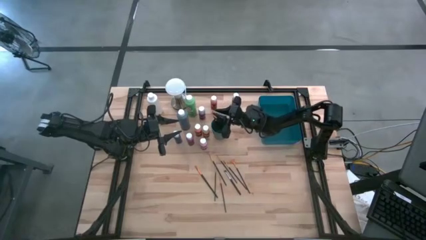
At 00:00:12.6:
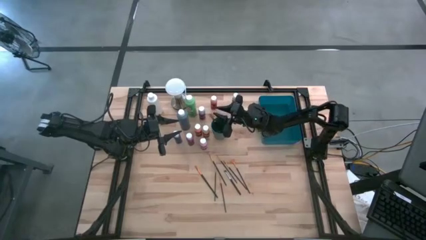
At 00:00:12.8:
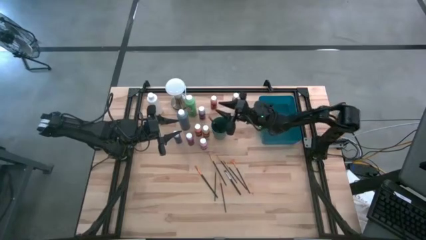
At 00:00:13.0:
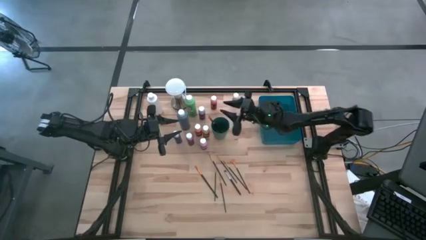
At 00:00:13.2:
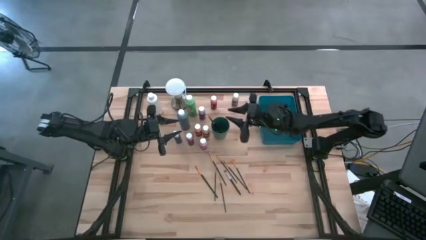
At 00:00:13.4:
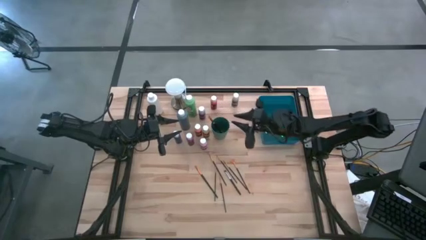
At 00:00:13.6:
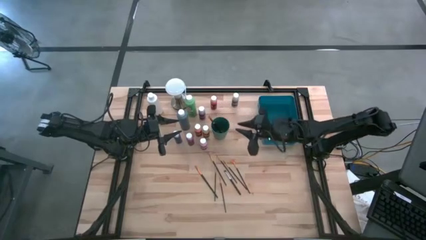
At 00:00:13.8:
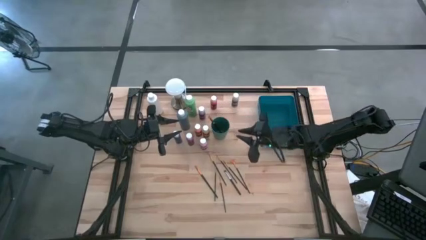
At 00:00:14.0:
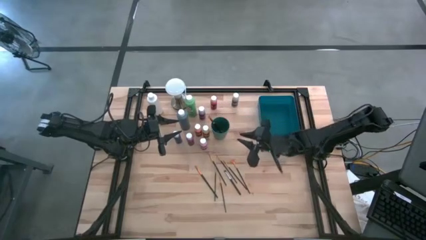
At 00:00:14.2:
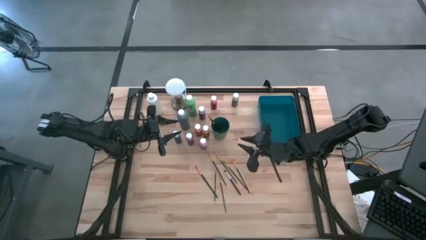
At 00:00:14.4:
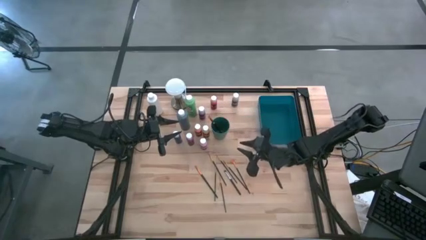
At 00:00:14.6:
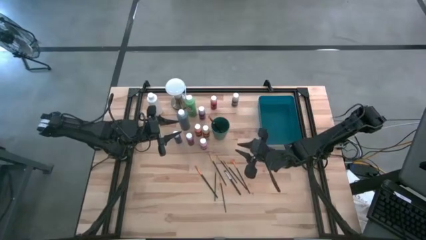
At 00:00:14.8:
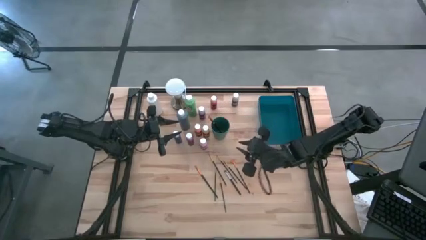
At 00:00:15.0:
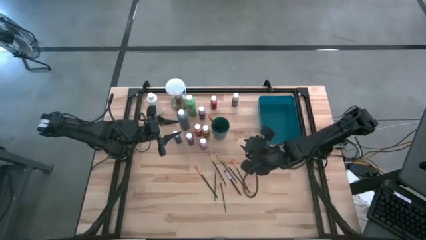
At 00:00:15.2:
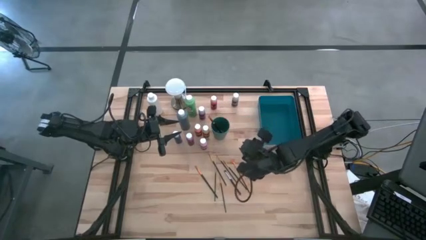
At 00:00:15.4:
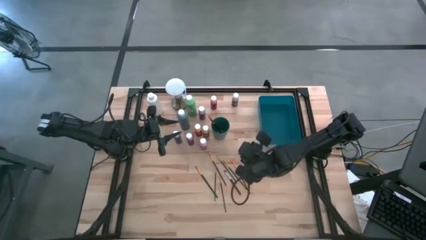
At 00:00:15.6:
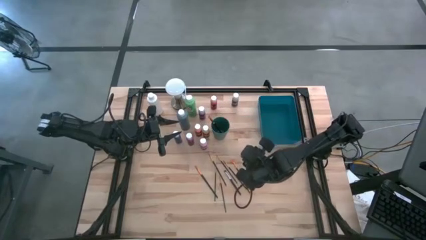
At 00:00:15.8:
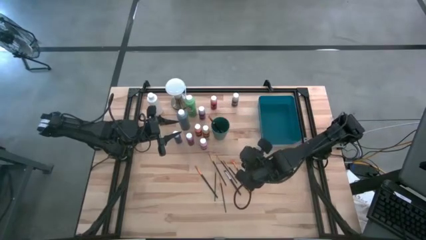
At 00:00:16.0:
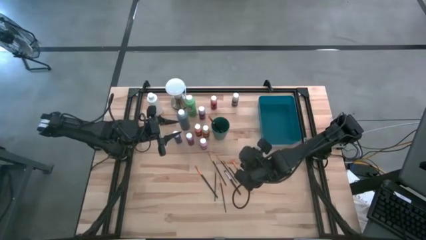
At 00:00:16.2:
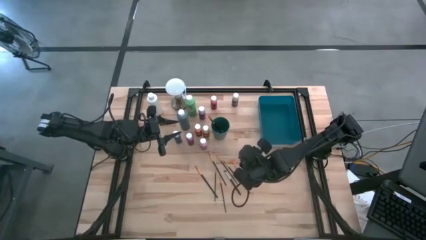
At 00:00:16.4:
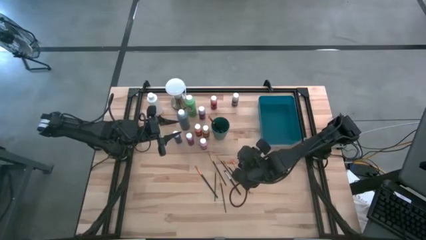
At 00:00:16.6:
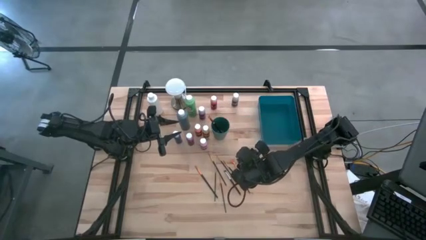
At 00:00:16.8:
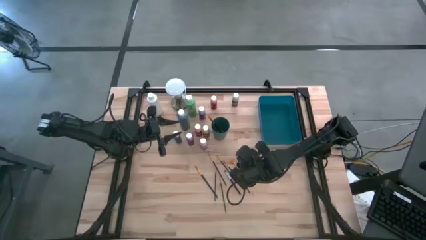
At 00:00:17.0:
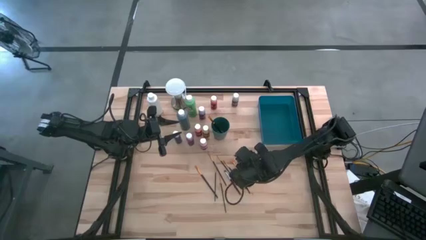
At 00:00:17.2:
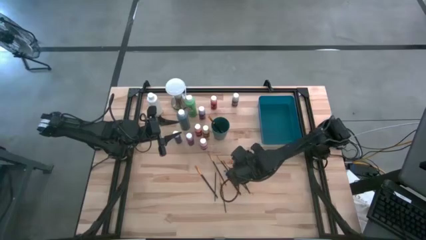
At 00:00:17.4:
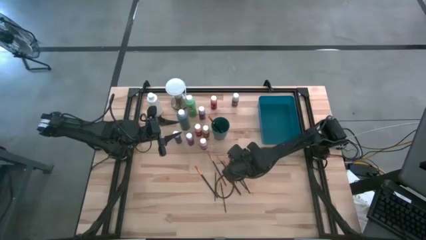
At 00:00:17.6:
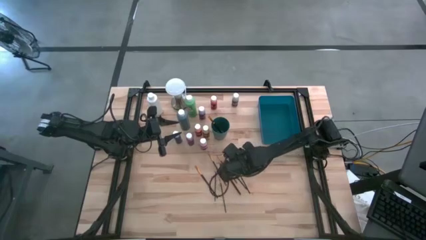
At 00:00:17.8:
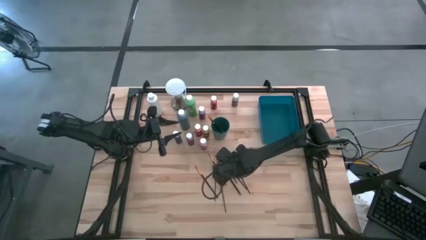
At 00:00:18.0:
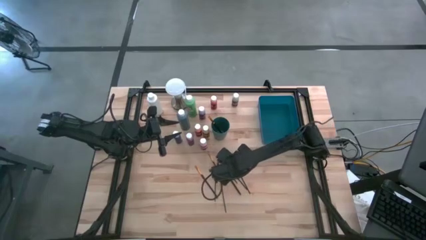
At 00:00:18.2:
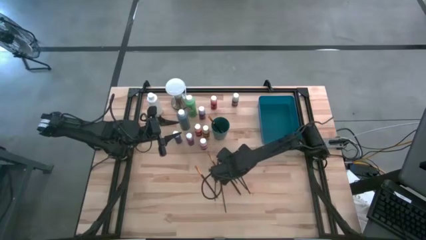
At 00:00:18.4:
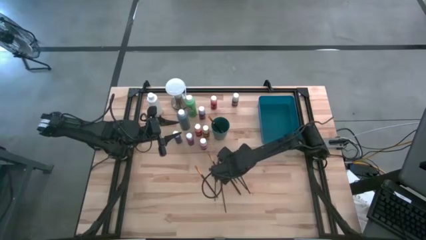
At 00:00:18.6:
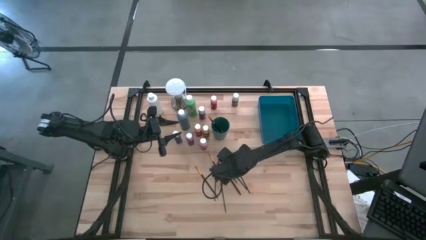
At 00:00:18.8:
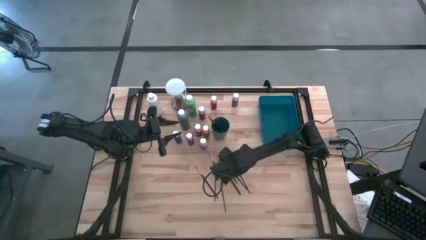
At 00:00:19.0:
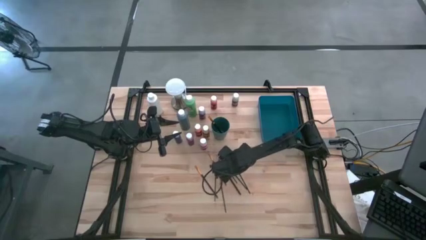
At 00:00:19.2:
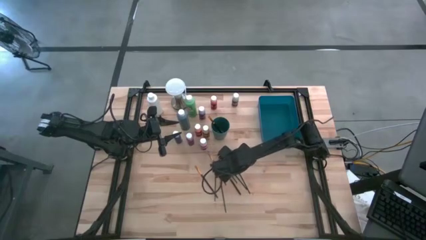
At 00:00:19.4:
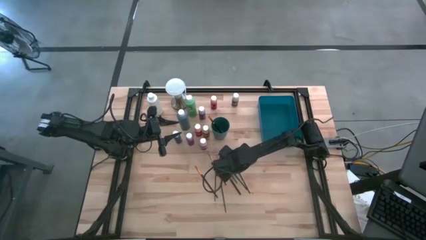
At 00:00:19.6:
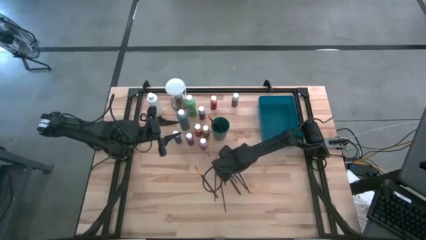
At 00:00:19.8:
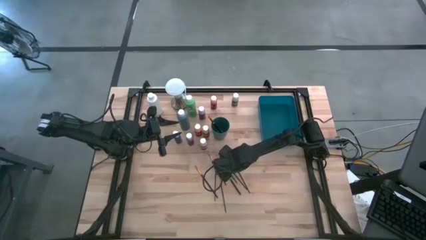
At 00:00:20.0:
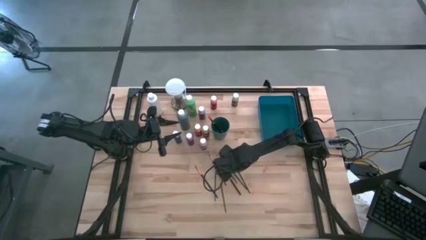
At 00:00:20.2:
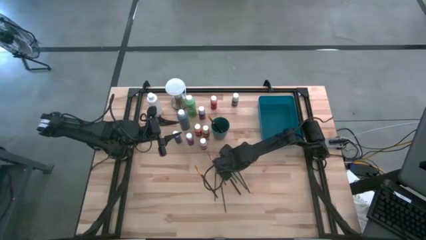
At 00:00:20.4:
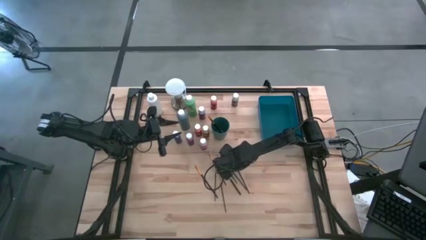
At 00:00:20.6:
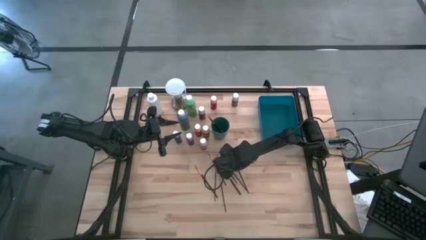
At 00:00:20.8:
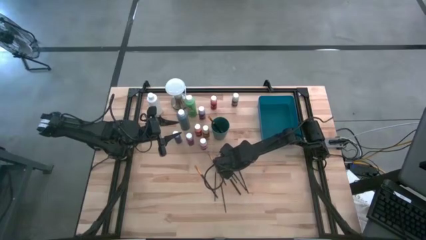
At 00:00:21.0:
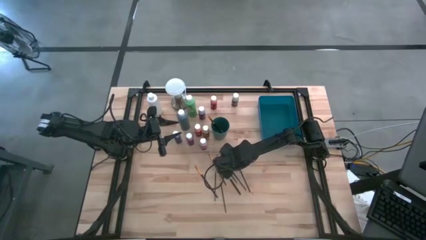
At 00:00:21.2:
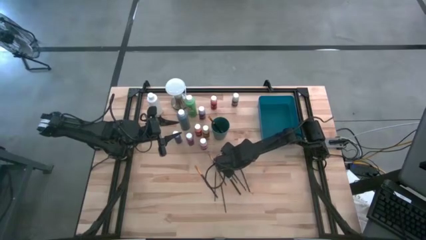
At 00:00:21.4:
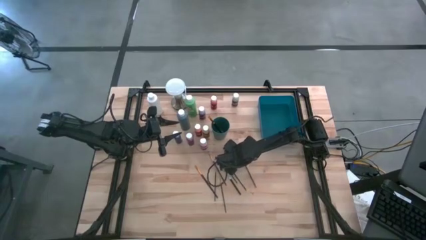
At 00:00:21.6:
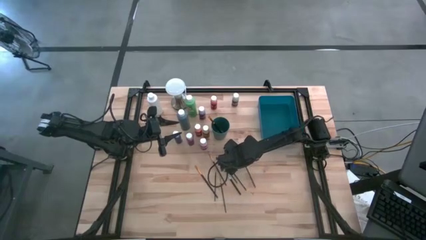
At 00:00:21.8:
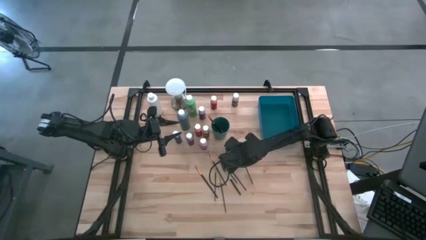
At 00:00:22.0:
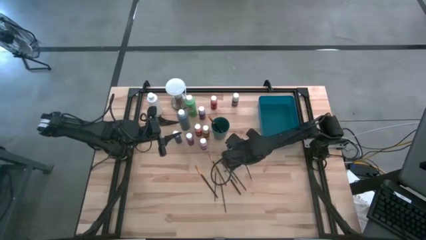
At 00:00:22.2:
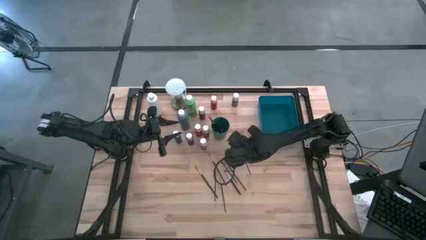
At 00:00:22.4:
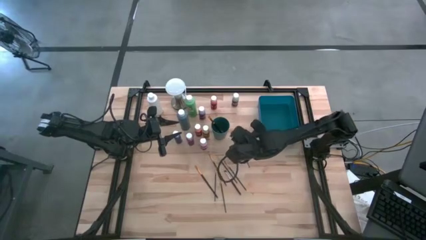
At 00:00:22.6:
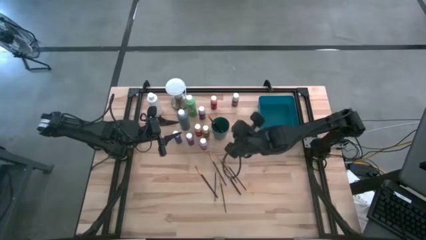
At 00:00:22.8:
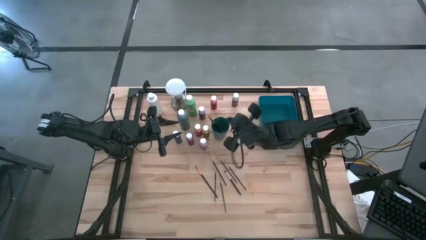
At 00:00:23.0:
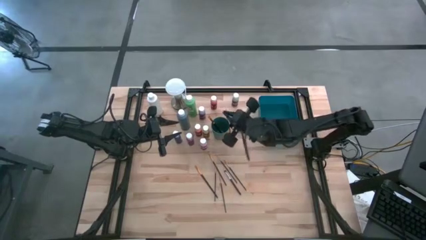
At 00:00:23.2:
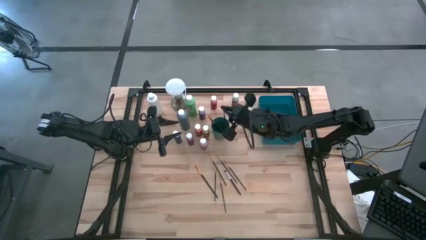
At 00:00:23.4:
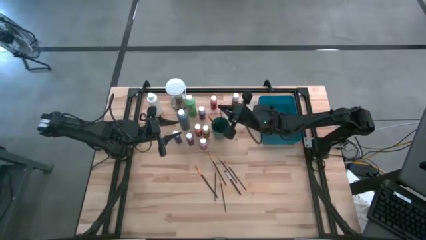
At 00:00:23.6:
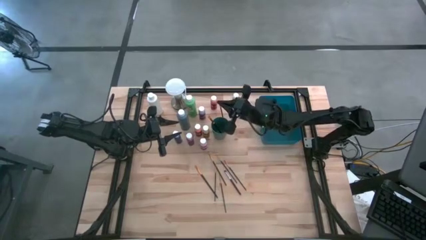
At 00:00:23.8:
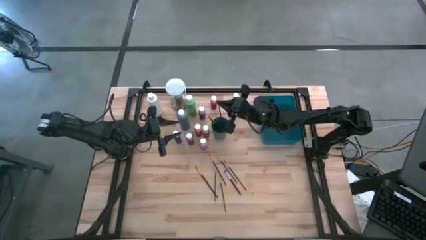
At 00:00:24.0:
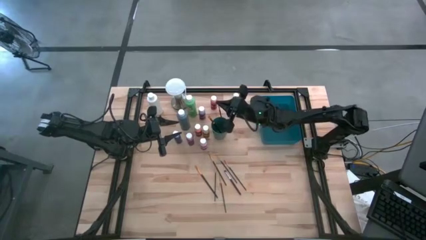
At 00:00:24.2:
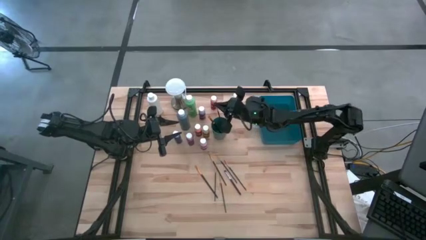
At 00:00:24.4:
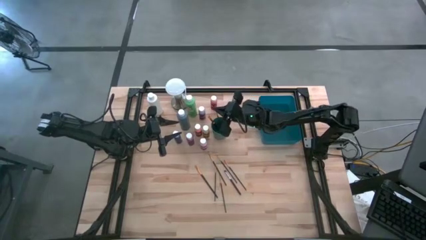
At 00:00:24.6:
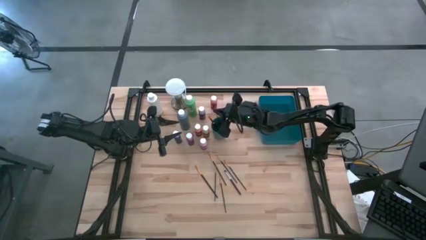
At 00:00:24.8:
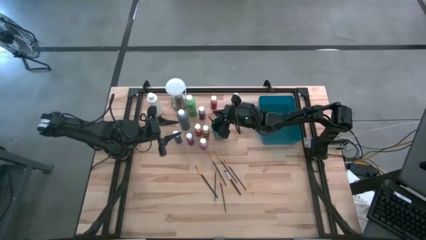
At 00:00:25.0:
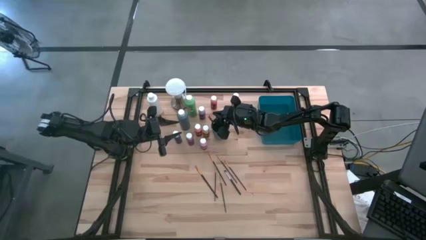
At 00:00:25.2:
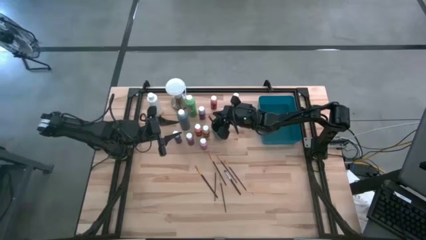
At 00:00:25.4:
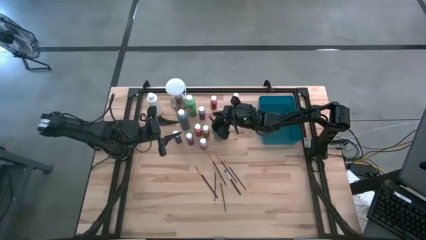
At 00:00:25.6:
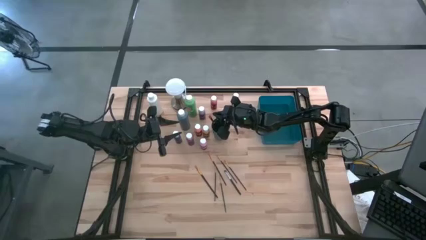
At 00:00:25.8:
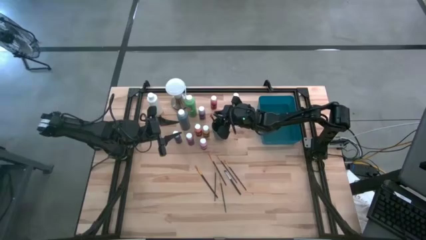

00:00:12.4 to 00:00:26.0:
Task: Pick & Place Paint Supplies
Put the gold paint brush into the green cup
